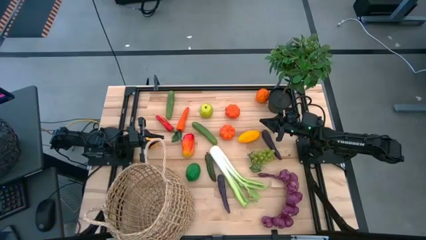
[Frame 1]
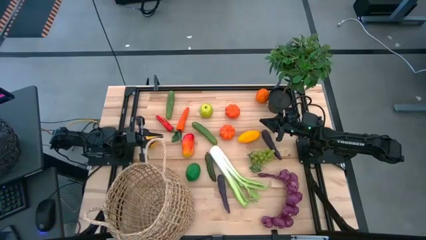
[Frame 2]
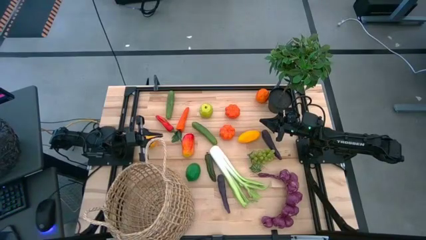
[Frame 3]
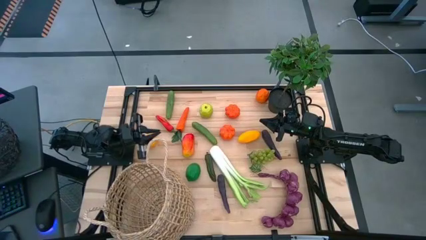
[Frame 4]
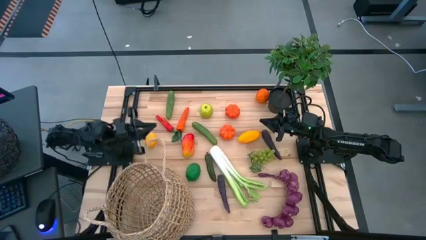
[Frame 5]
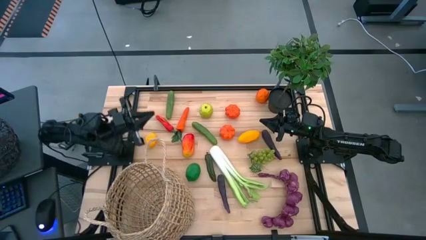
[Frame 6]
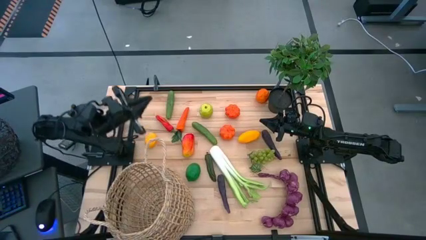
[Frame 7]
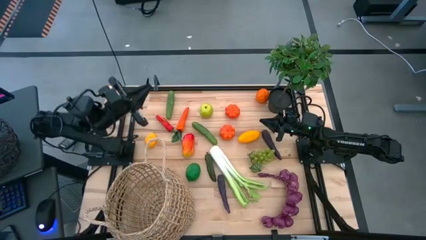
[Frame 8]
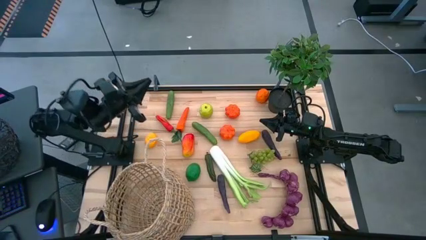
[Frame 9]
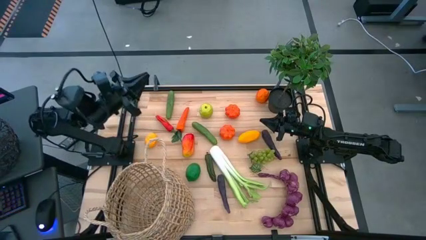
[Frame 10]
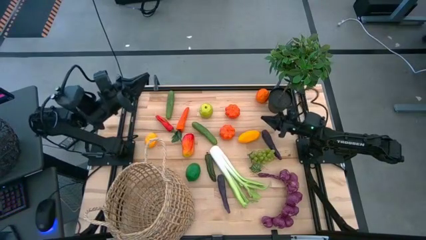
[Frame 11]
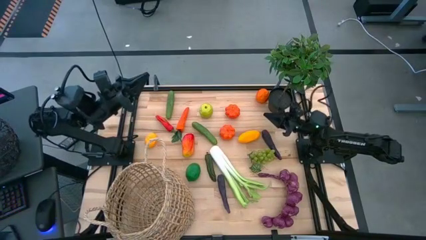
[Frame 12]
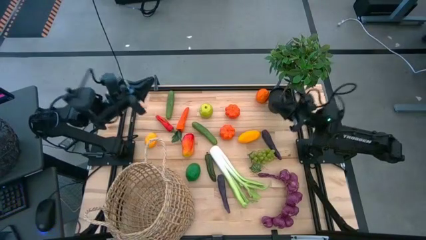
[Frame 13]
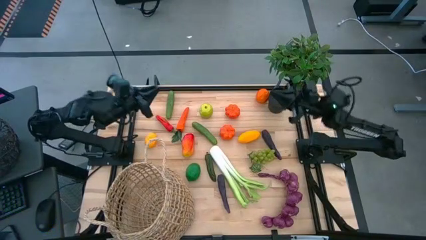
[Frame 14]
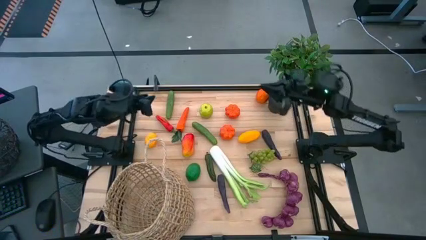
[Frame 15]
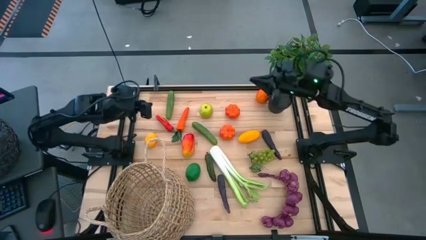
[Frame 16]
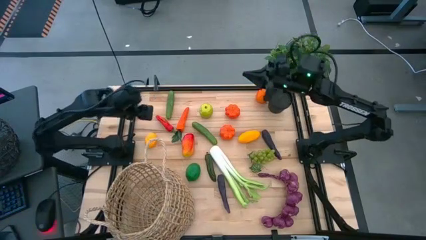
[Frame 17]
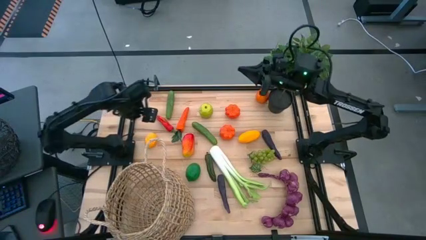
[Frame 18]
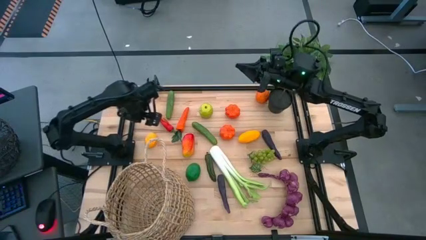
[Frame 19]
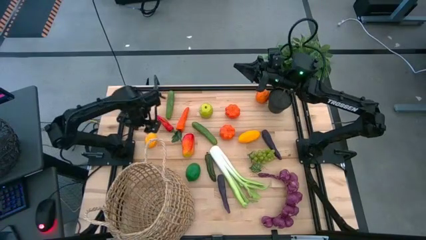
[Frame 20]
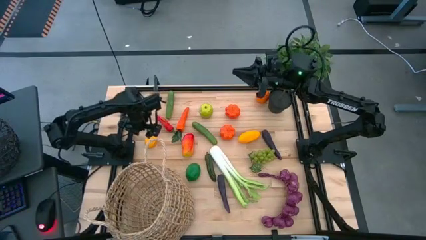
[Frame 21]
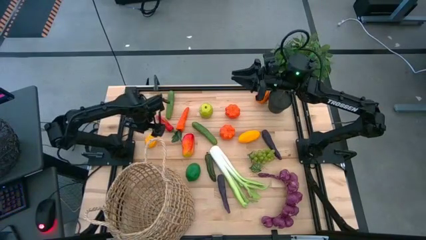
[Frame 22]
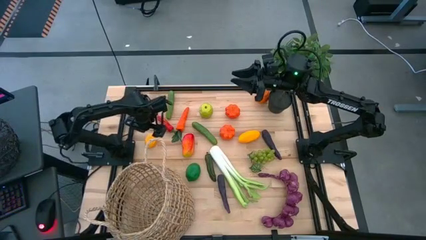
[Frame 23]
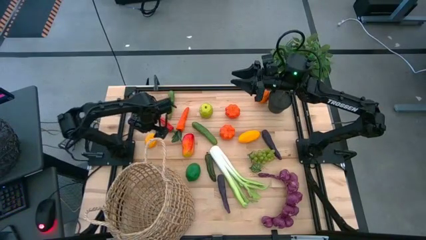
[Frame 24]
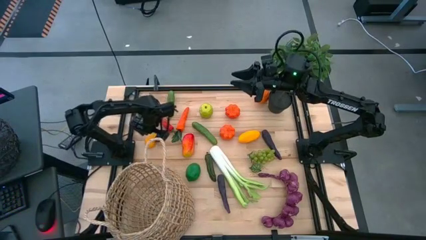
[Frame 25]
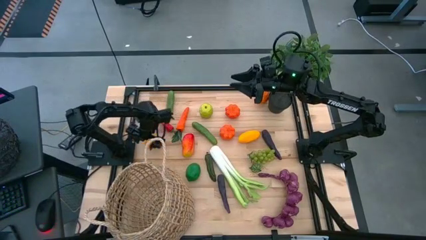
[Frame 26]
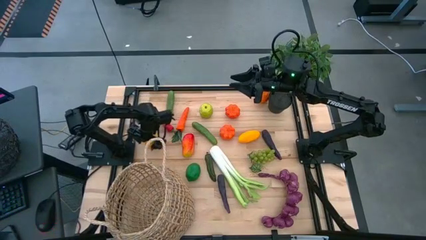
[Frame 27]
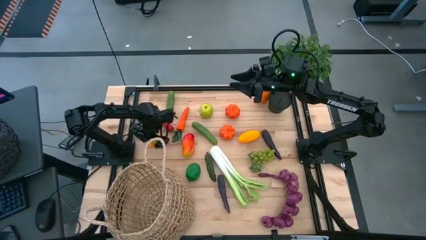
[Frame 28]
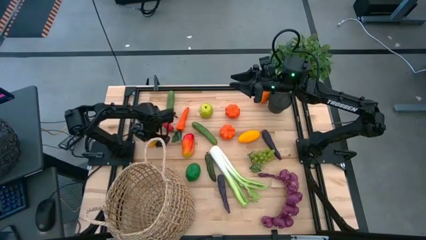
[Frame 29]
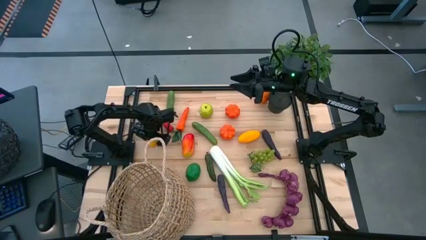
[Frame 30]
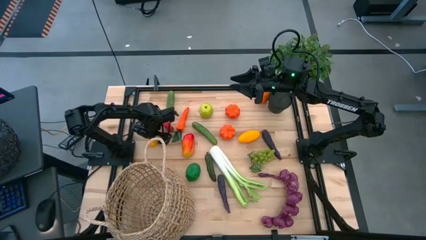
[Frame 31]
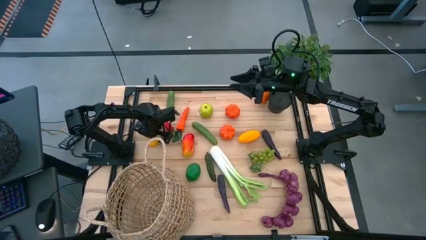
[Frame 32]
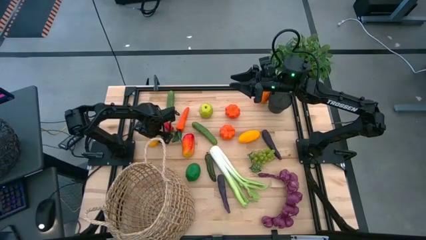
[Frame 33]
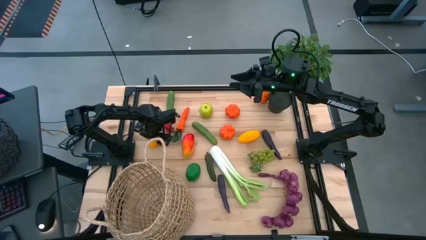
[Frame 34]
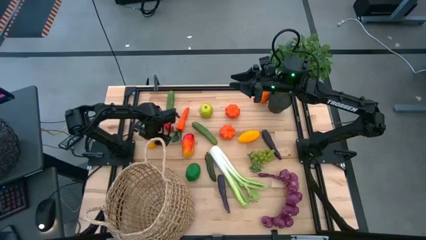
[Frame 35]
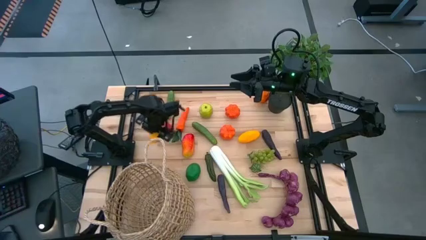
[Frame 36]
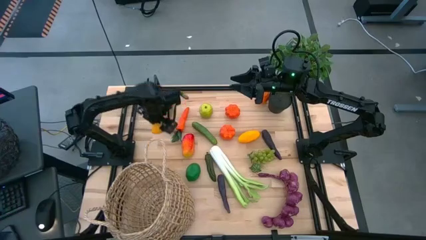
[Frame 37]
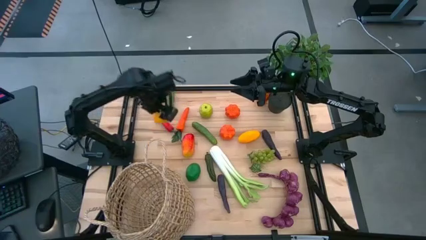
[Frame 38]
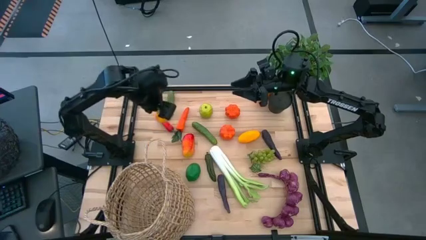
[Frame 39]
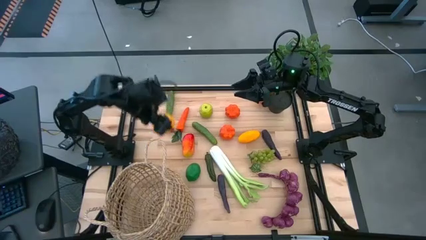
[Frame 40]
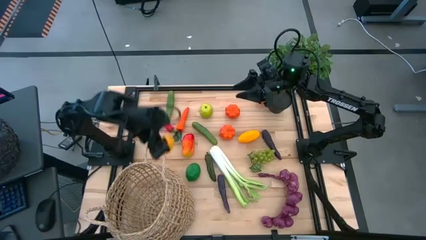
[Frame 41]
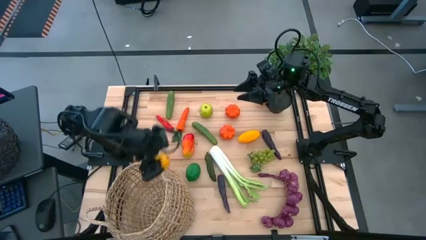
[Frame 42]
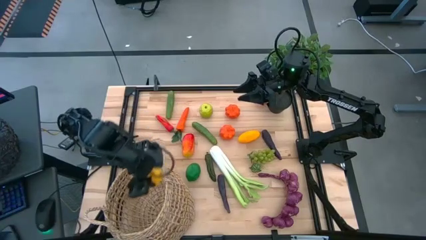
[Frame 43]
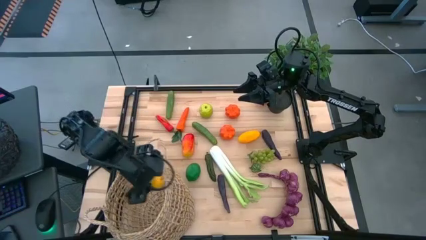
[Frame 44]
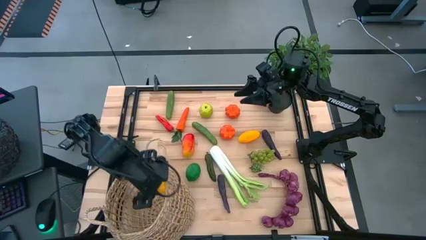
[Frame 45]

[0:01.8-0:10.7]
Task: Build produce basket
Put the lemon into the basket

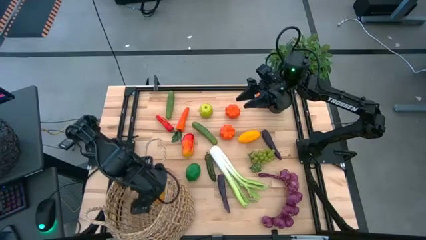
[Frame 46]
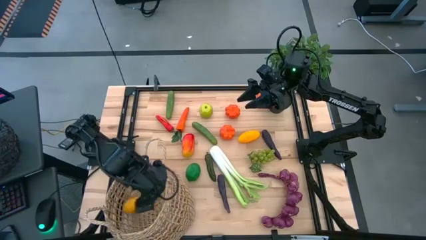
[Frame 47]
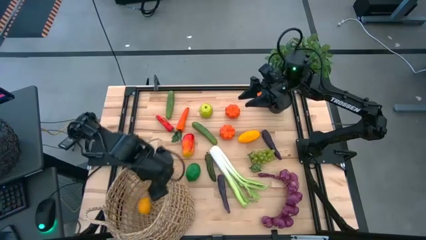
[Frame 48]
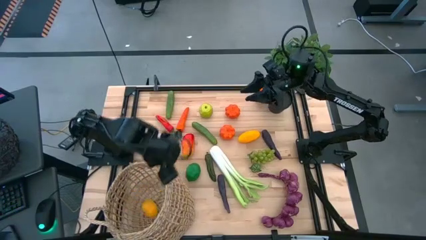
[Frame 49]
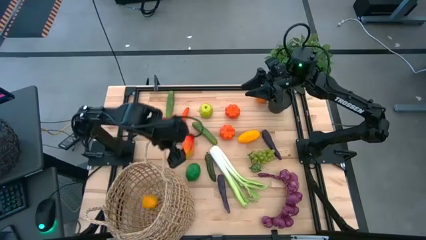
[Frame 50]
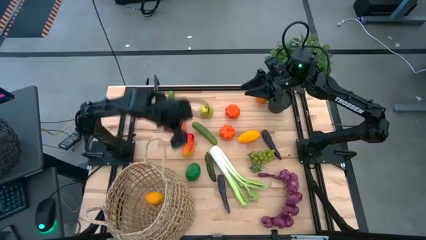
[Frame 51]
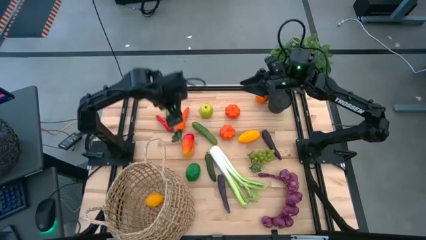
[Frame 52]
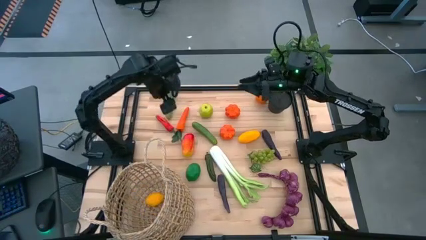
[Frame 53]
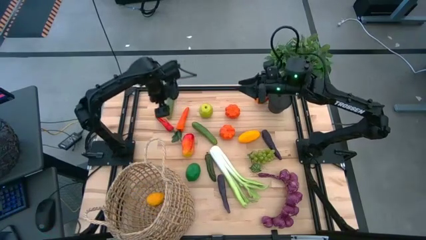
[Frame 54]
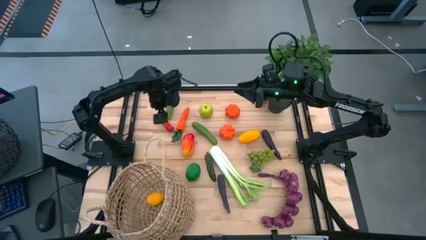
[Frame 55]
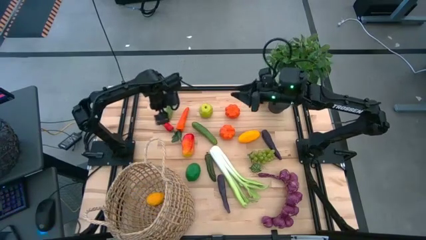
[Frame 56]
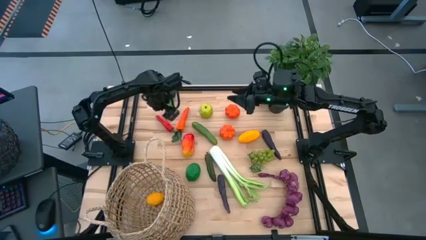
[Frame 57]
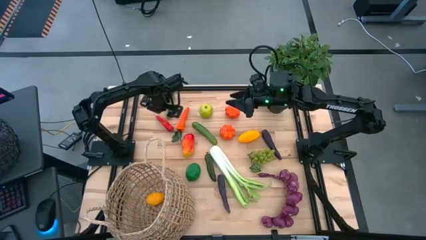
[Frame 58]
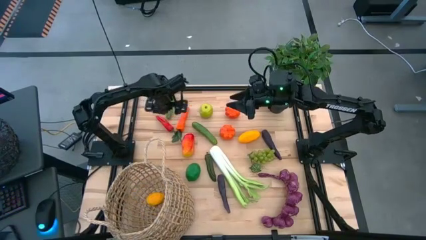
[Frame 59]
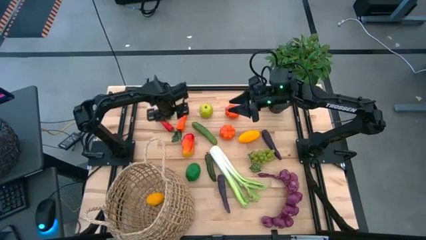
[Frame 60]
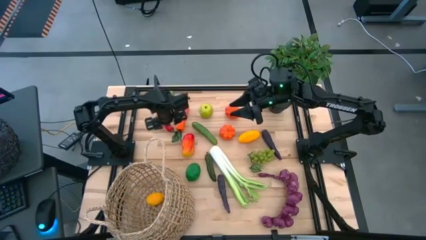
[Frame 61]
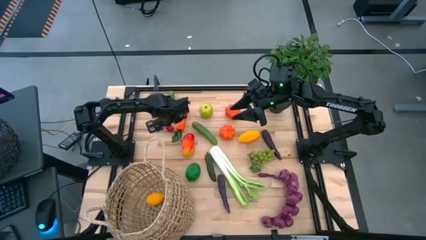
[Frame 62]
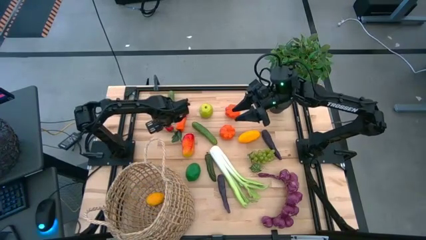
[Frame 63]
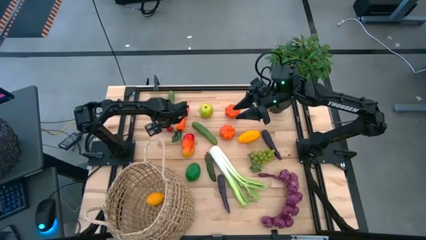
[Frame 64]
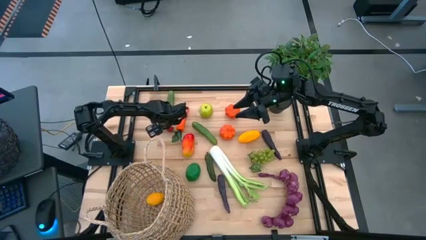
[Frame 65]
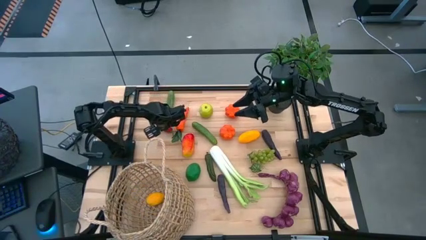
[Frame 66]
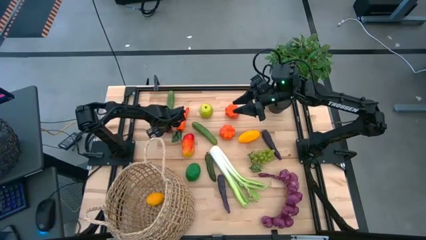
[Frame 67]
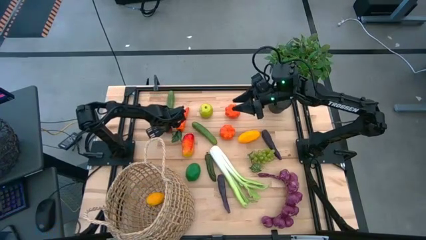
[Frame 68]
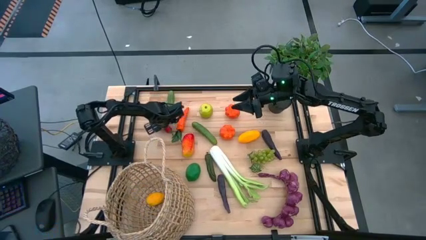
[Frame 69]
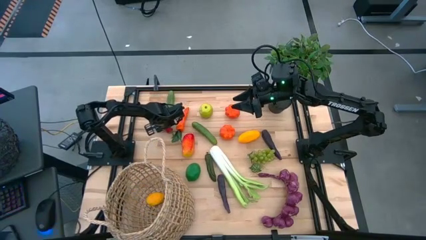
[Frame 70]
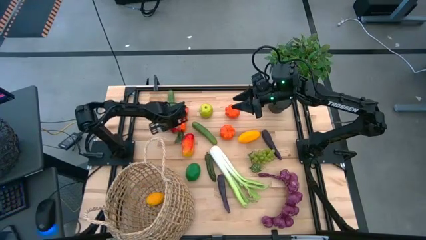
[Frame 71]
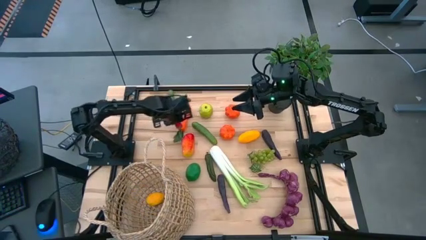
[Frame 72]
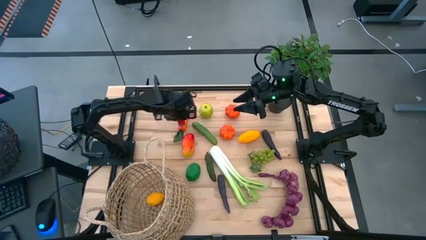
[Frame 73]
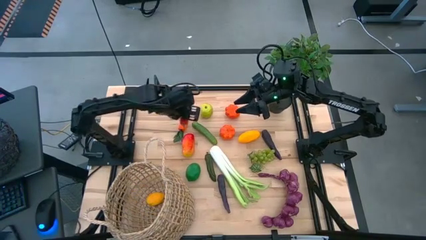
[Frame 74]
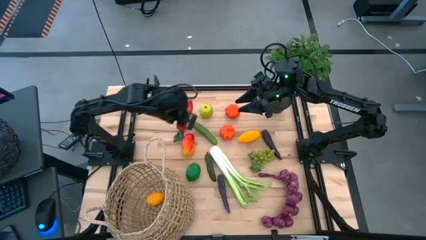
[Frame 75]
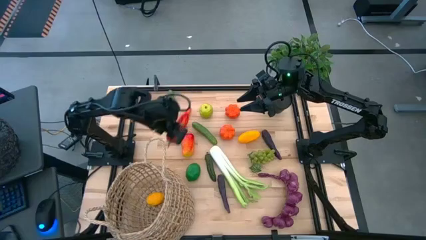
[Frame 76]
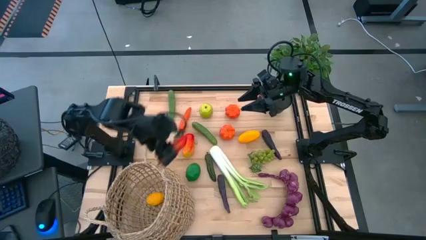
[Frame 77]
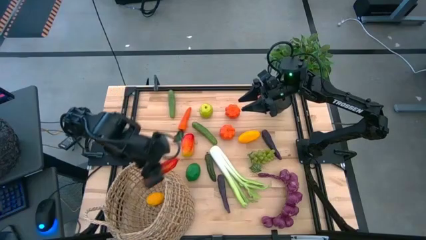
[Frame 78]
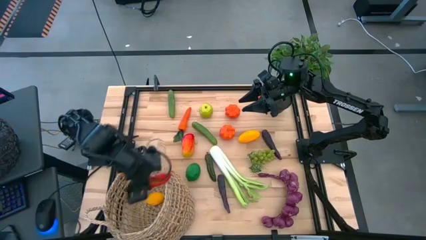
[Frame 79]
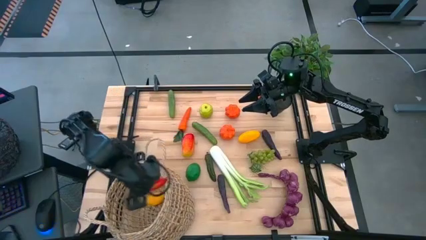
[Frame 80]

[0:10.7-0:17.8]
Put the red chili pepper into the basket
